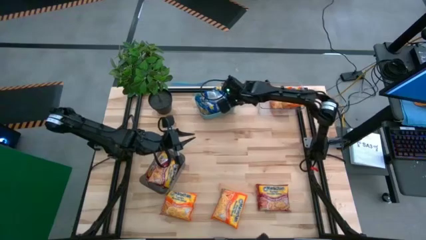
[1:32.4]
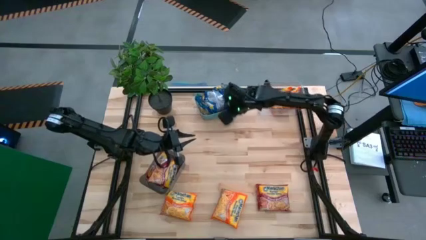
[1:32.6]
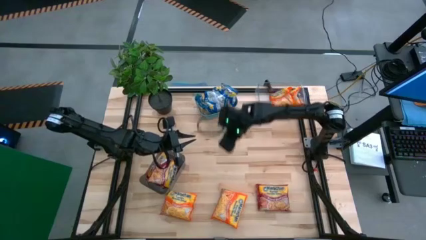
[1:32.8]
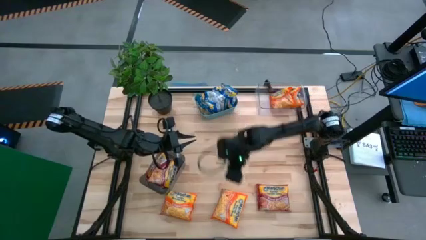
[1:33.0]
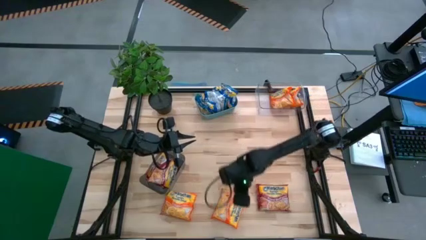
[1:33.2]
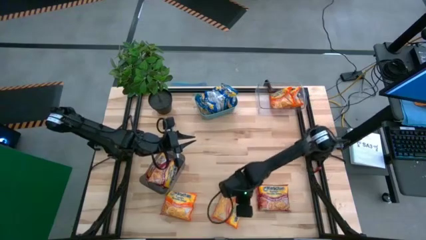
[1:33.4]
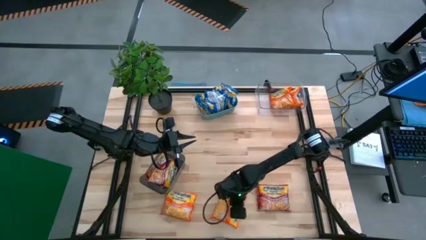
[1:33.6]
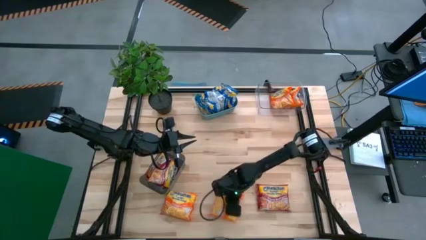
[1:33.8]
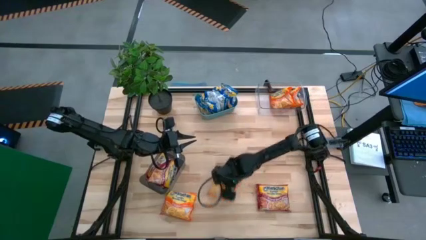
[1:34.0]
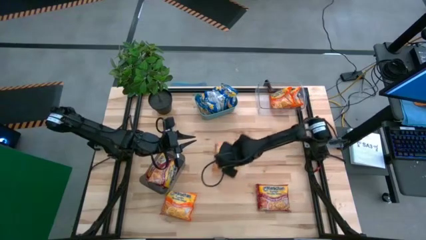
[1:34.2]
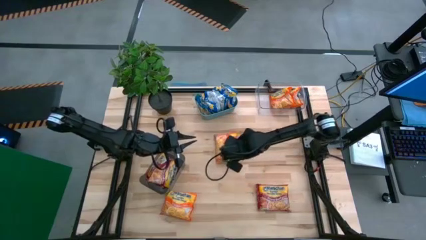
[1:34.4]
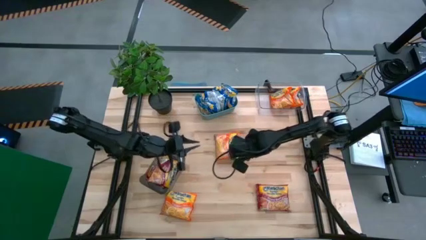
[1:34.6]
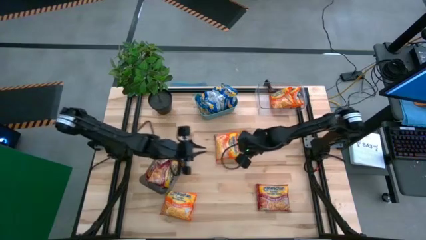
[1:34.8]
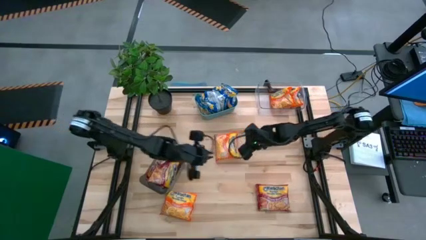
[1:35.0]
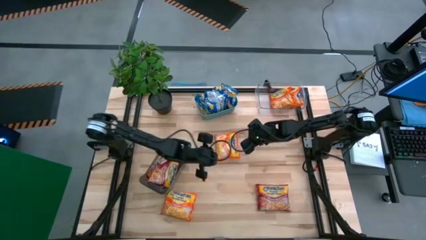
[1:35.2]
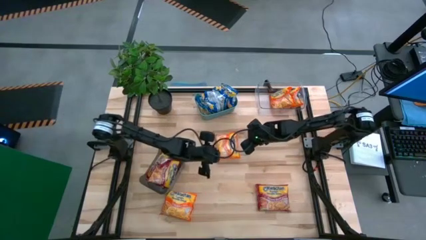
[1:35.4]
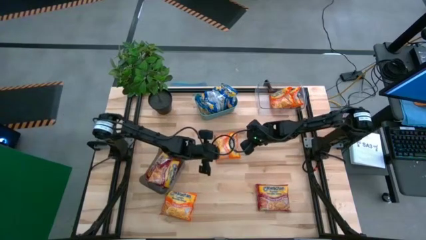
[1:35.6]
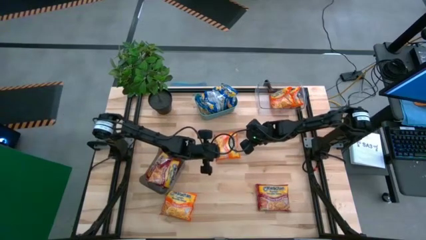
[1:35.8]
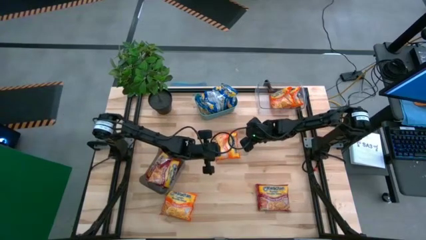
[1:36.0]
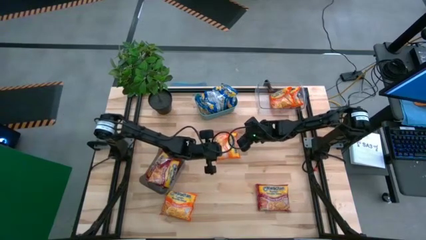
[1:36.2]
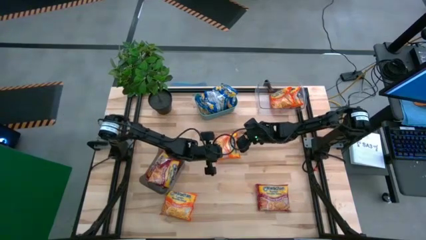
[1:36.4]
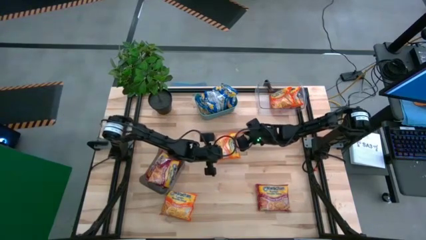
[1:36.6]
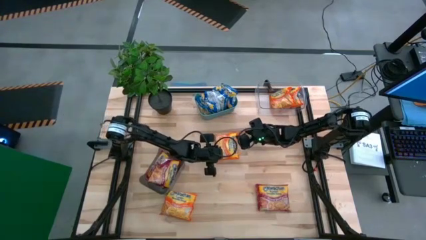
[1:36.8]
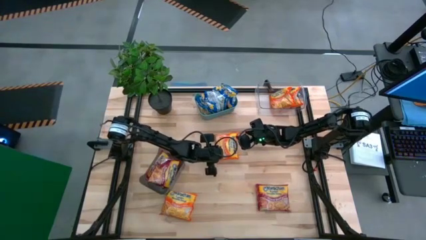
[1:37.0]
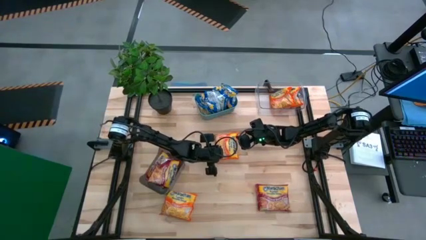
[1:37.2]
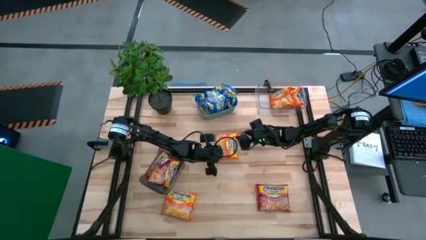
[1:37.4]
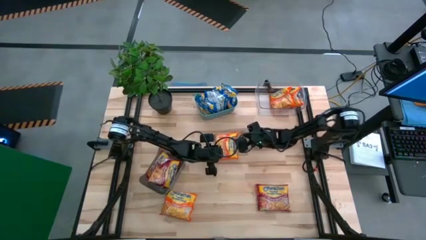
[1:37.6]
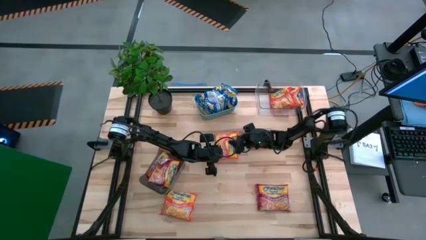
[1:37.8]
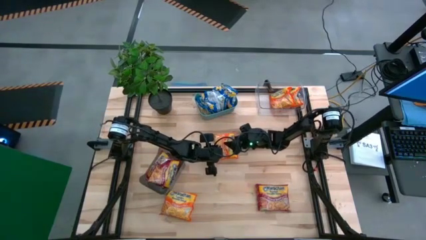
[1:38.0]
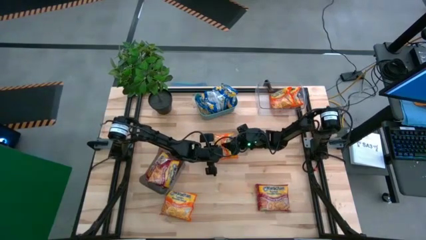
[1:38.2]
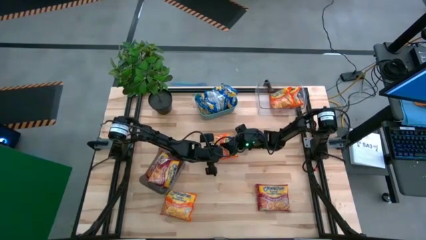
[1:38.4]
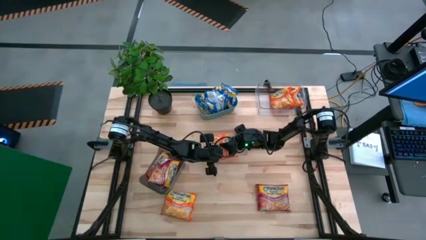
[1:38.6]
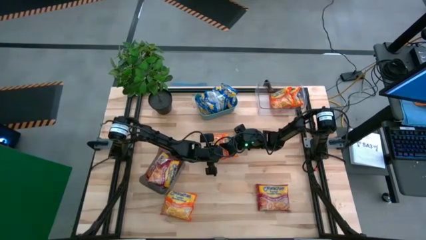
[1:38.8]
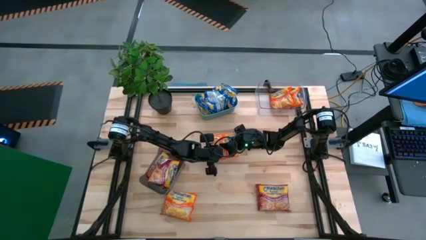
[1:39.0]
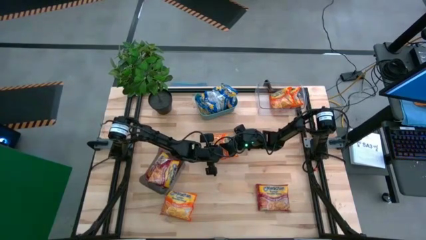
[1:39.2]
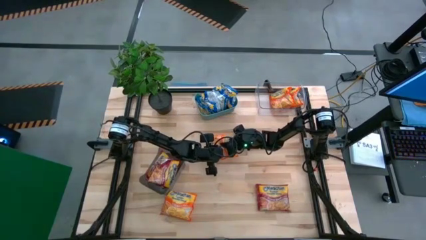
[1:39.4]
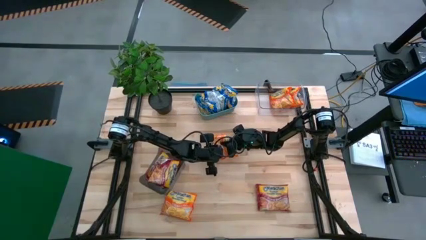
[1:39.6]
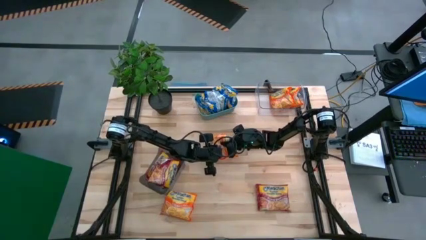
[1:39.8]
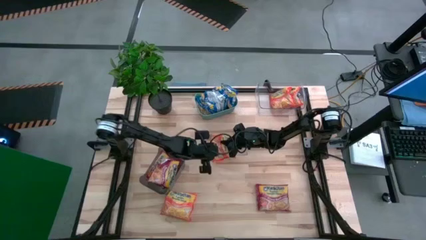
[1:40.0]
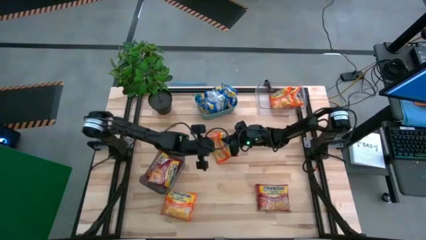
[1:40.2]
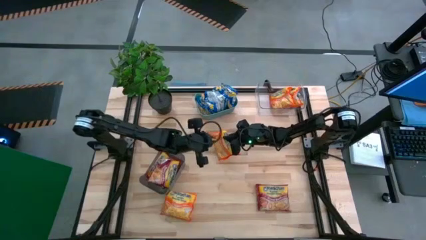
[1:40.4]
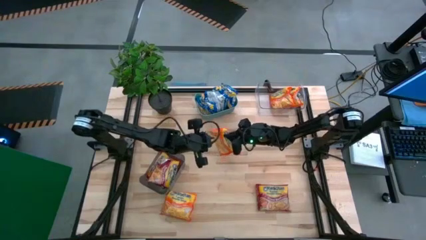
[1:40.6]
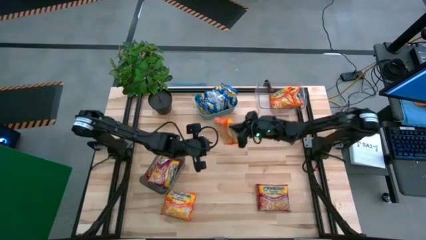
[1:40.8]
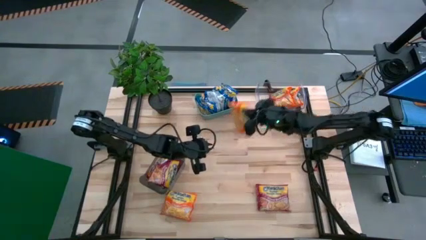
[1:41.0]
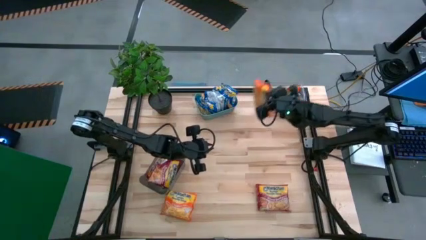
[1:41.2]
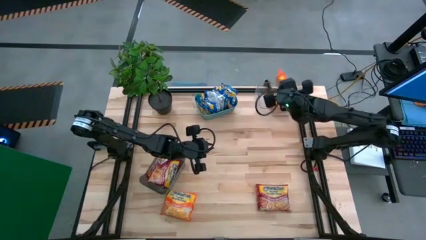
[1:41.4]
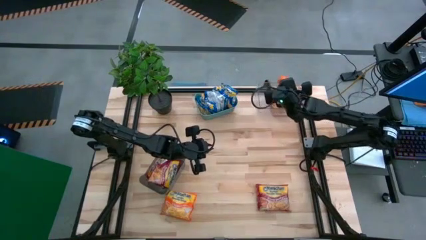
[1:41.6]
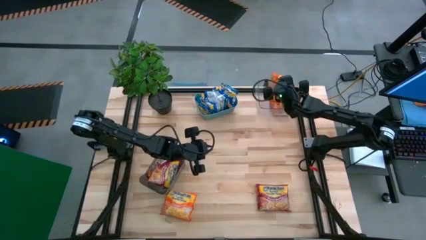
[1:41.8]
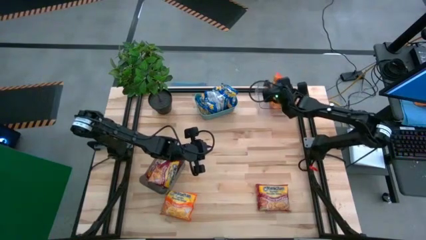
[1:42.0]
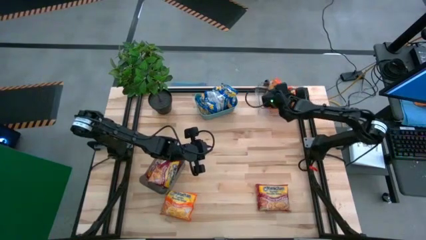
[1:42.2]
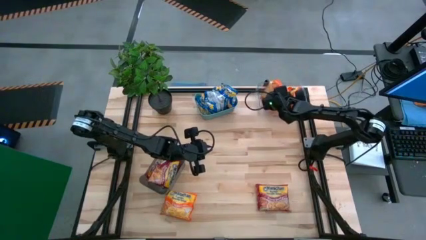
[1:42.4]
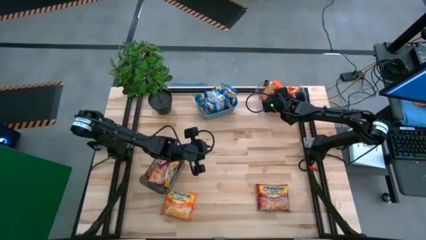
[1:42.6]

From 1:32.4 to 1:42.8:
Task: Sort Maruchan noodles
Put the right orange noodle pack into the transparent bin

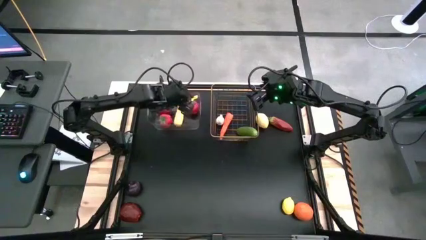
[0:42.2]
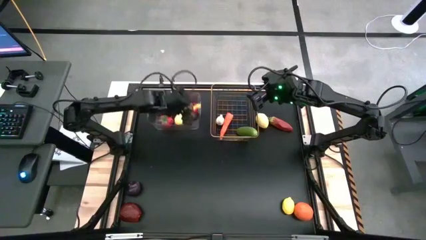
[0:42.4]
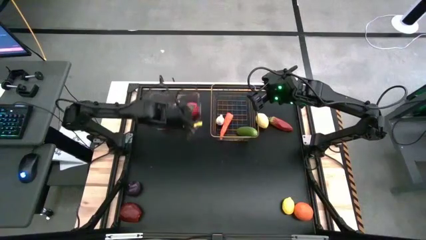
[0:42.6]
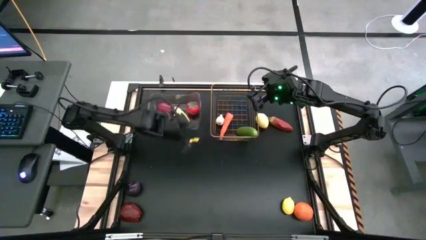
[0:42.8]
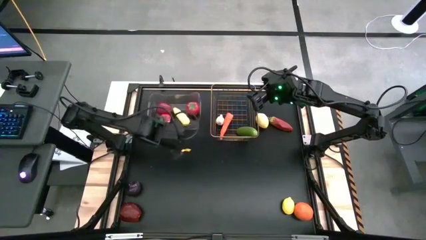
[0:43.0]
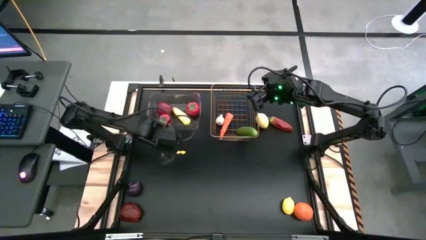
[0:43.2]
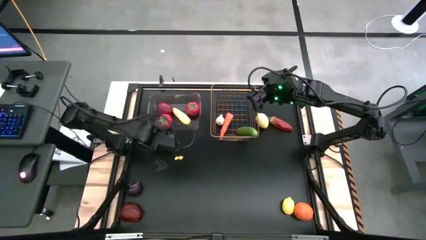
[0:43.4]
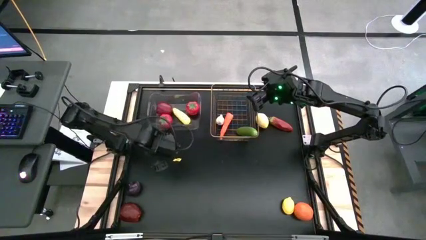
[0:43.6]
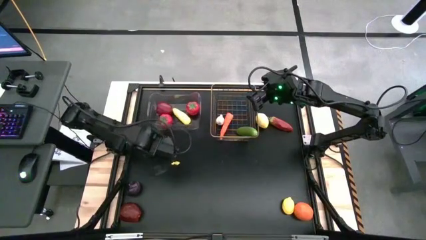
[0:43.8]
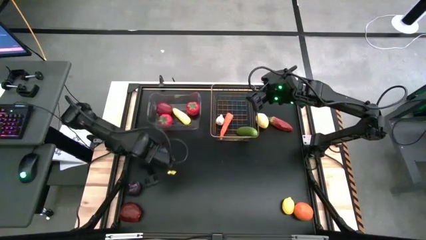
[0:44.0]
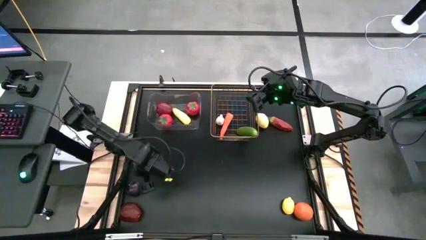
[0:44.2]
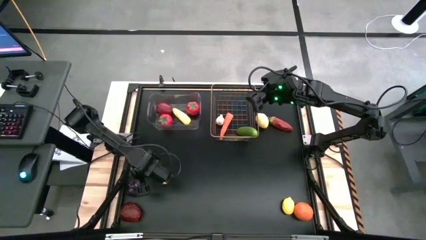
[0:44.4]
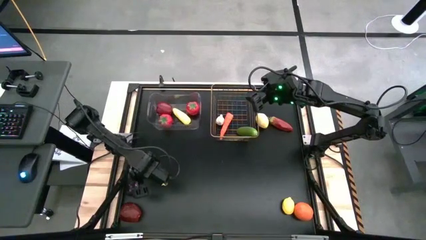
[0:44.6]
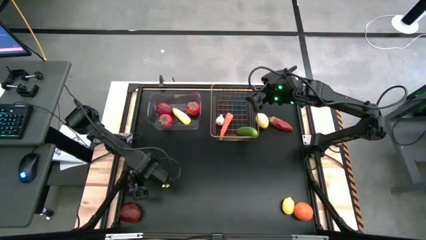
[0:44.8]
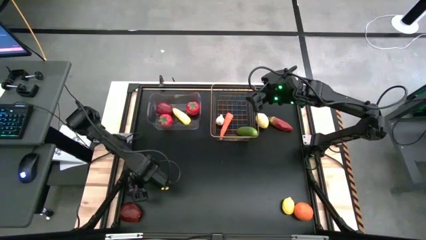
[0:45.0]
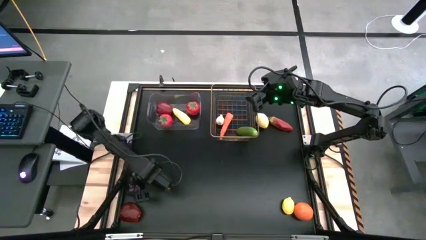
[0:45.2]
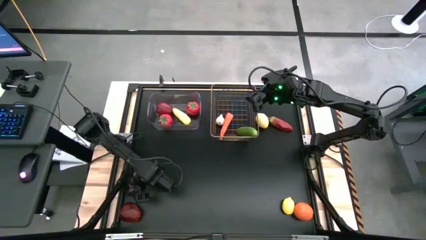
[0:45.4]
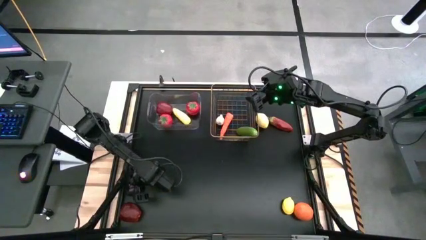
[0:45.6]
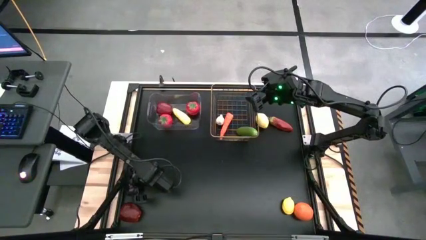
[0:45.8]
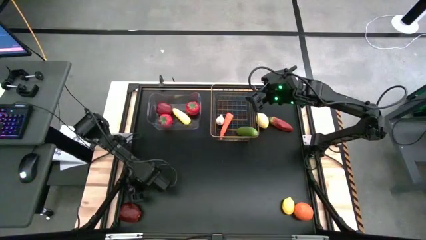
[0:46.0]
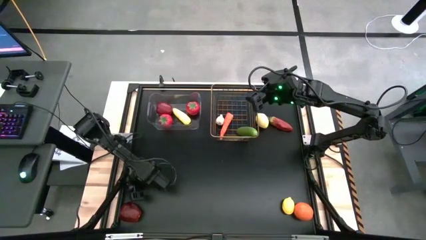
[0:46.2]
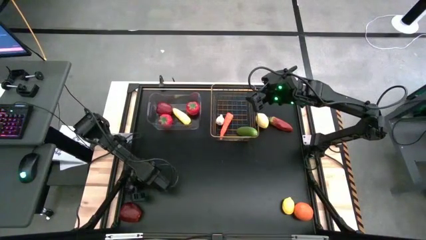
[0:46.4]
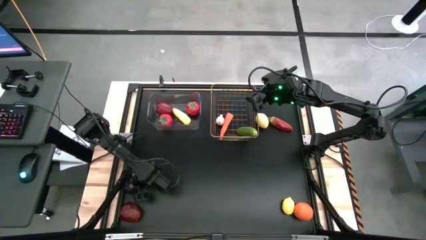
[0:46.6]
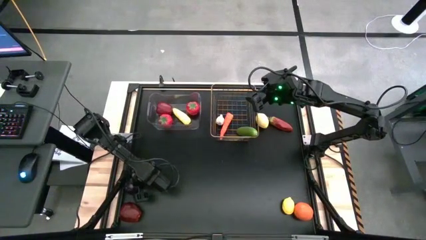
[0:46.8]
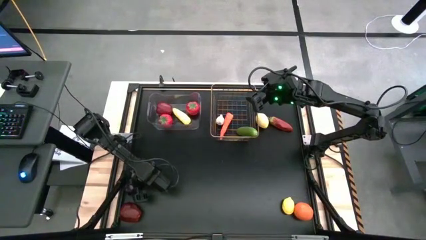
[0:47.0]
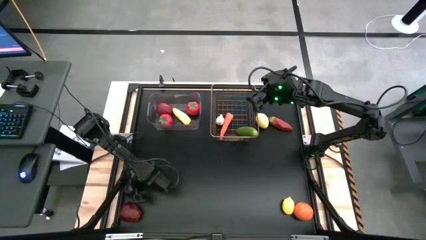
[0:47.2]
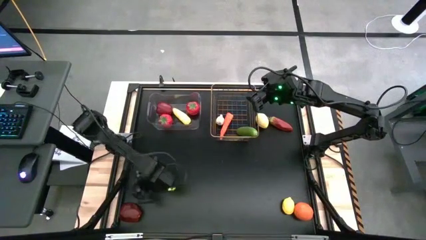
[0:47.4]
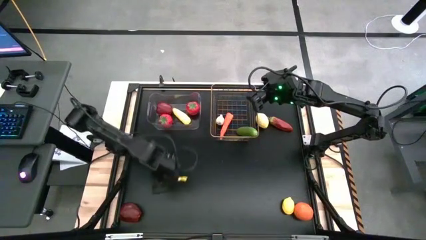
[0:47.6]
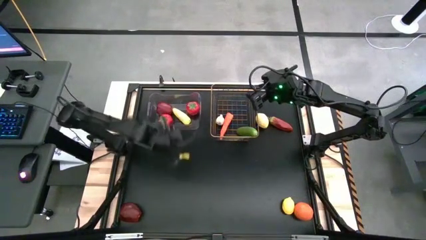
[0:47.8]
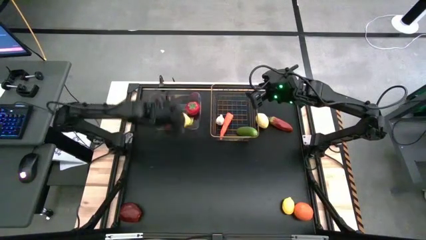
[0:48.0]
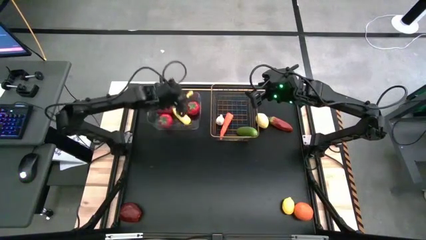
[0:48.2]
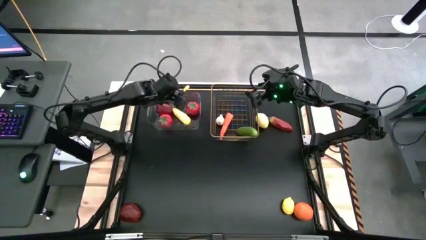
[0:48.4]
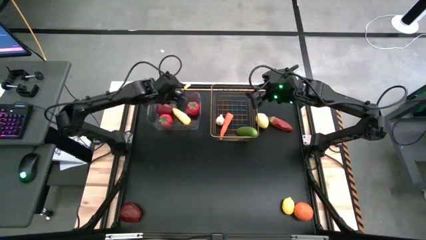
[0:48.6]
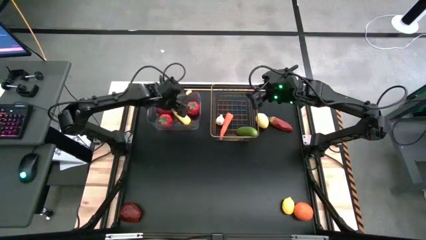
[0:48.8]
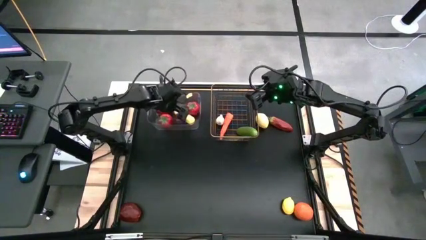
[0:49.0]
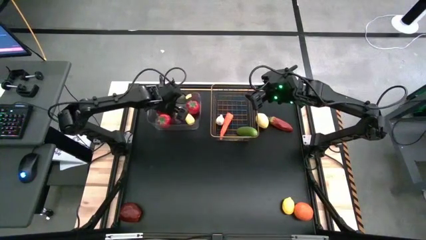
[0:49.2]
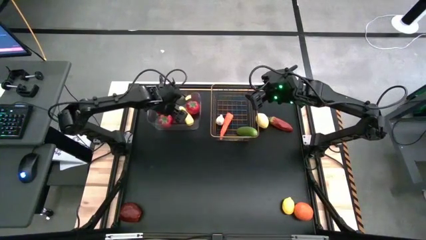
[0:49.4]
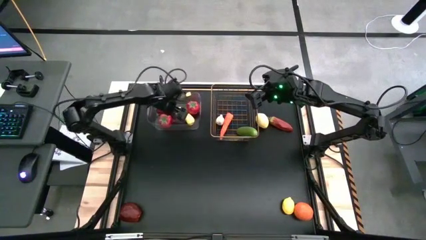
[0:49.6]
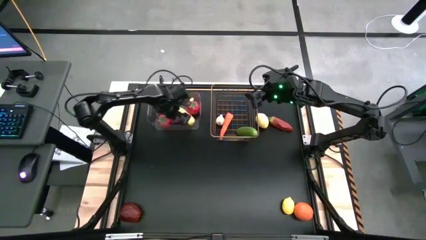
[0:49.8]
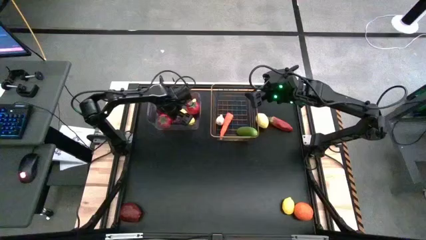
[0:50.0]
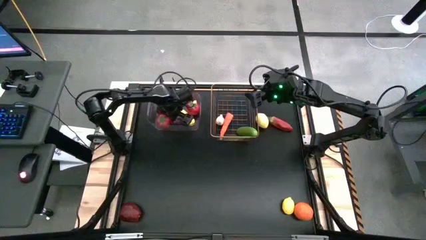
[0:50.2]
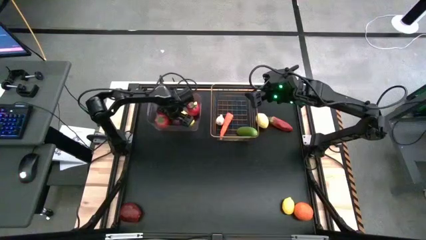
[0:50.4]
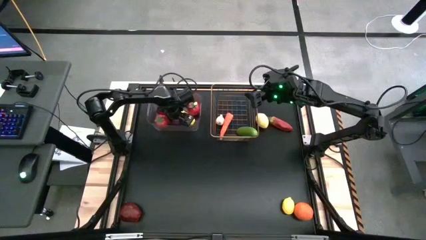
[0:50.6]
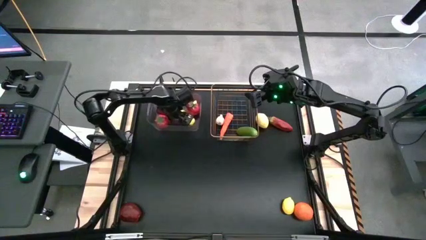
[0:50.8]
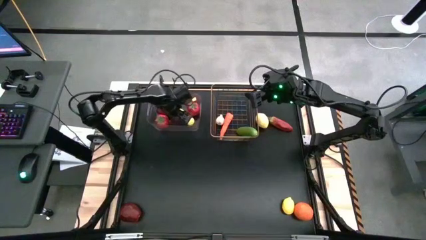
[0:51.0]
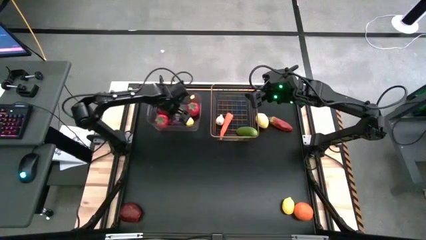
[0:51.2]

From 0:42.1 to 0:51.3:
Task: Sort produce into baskets
Put the onion into the gold wire basket
